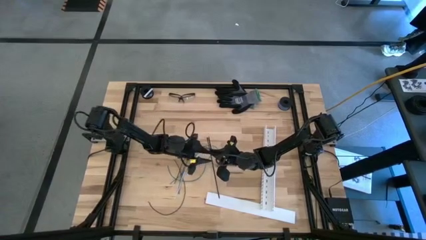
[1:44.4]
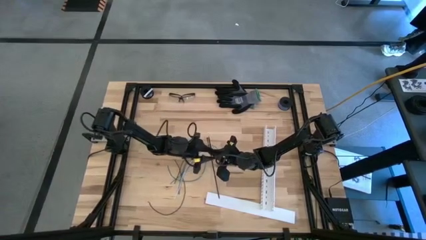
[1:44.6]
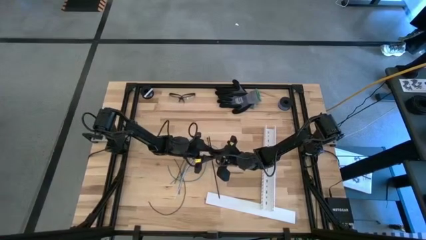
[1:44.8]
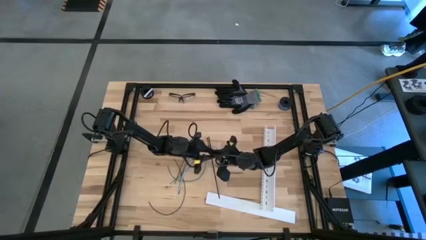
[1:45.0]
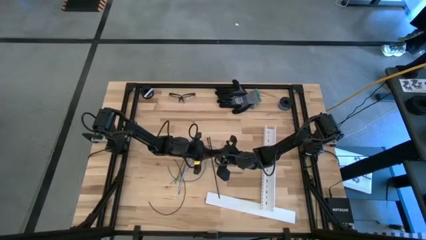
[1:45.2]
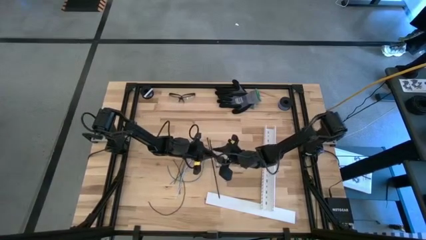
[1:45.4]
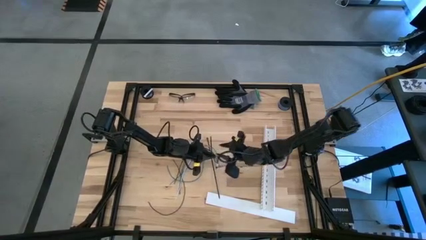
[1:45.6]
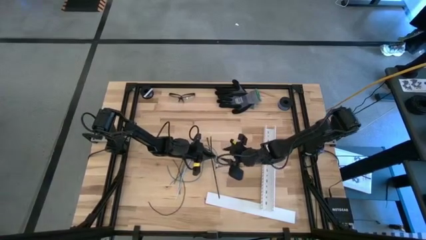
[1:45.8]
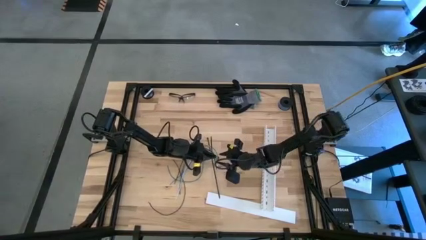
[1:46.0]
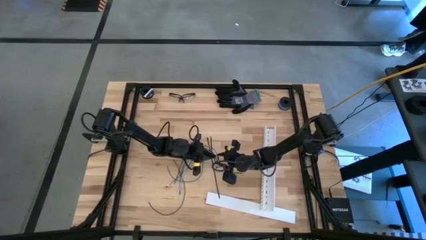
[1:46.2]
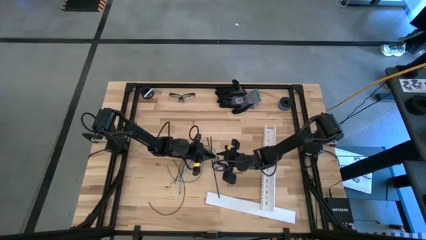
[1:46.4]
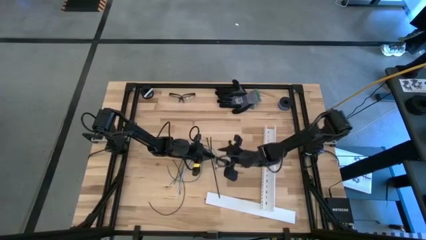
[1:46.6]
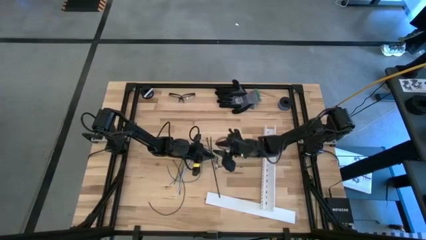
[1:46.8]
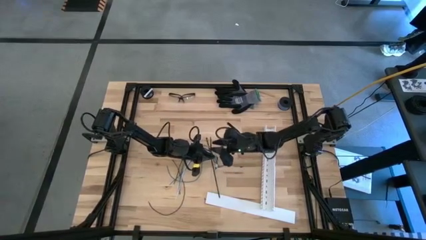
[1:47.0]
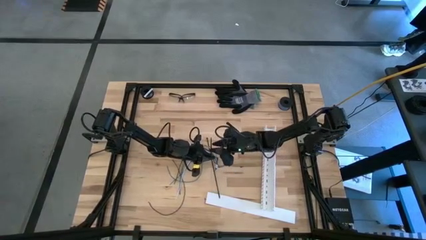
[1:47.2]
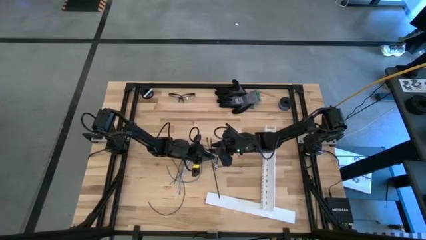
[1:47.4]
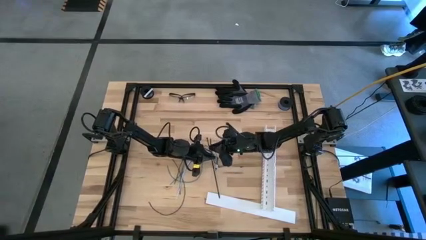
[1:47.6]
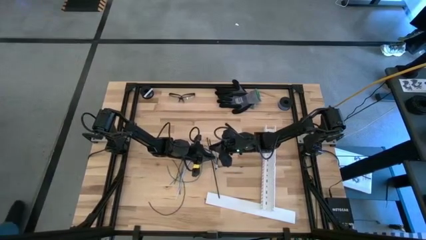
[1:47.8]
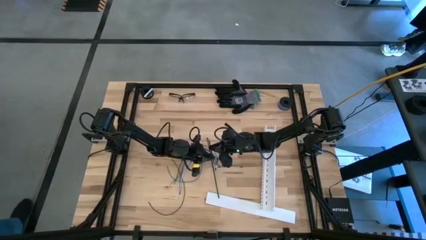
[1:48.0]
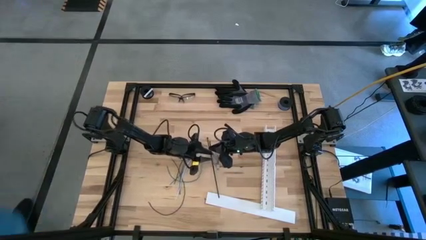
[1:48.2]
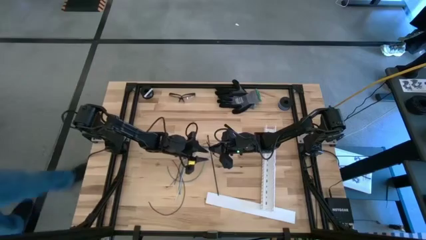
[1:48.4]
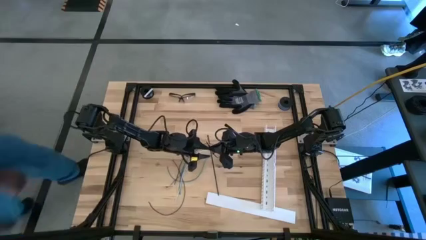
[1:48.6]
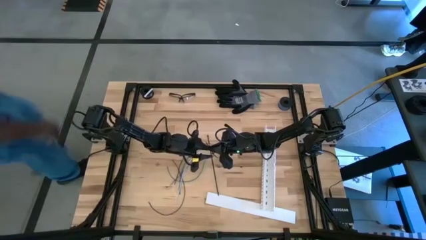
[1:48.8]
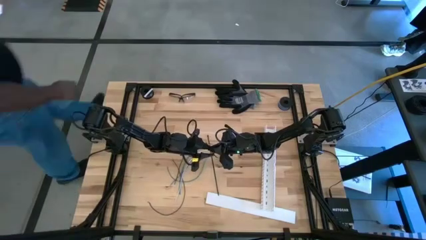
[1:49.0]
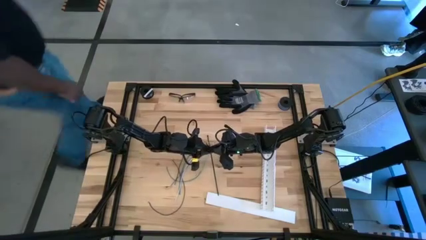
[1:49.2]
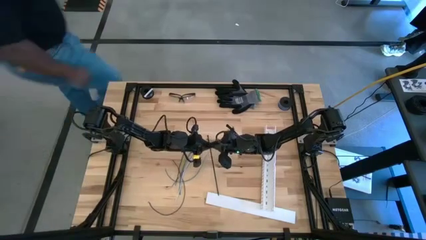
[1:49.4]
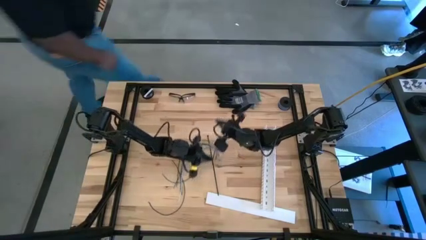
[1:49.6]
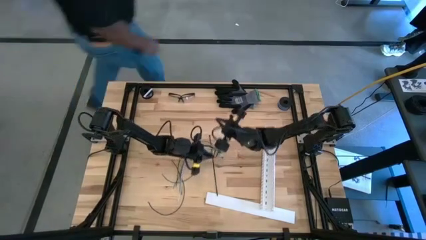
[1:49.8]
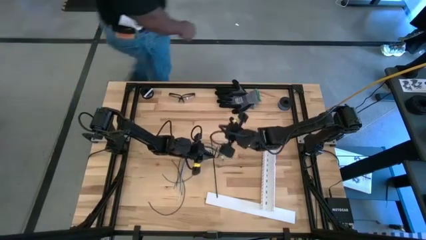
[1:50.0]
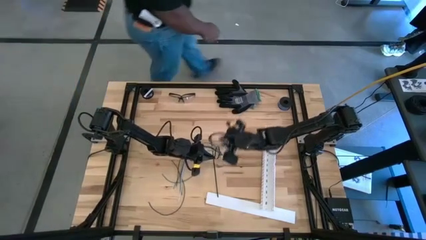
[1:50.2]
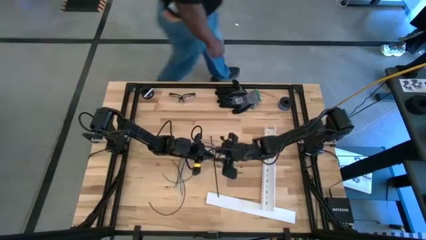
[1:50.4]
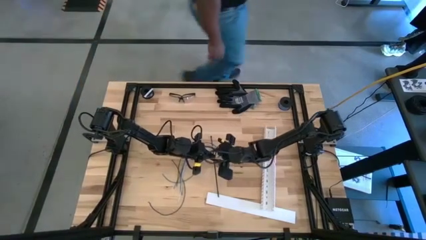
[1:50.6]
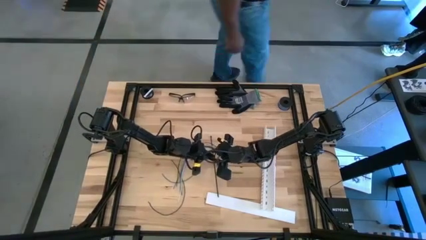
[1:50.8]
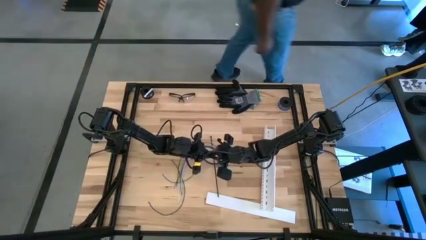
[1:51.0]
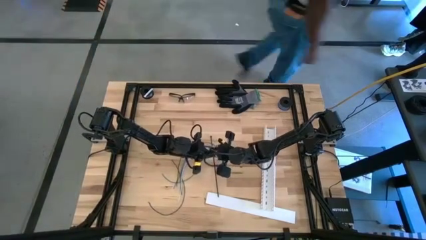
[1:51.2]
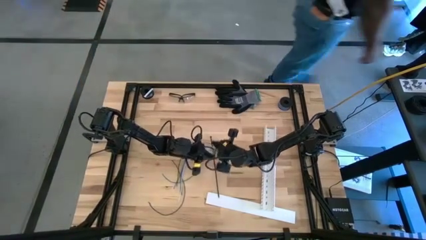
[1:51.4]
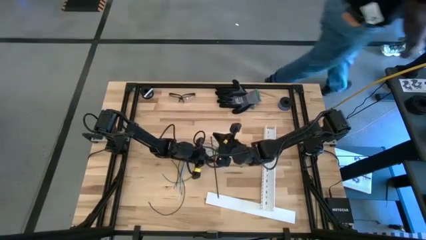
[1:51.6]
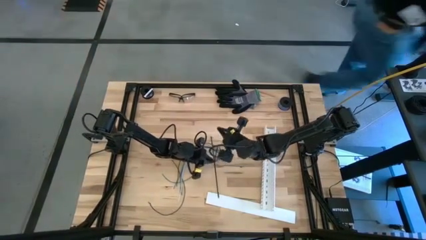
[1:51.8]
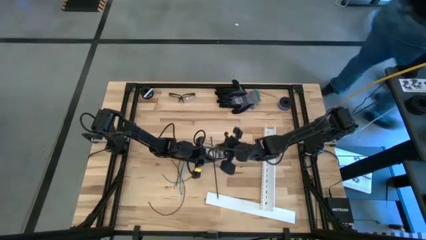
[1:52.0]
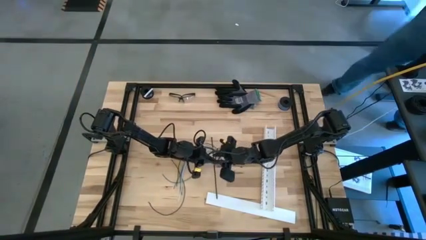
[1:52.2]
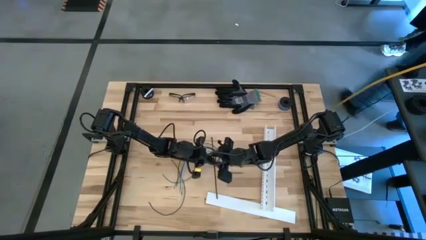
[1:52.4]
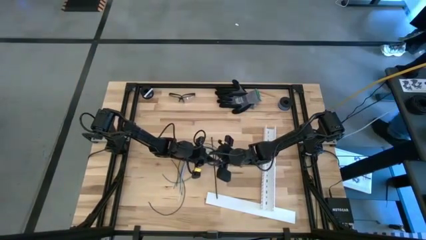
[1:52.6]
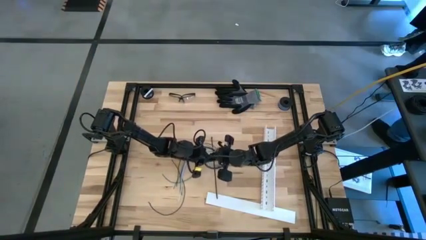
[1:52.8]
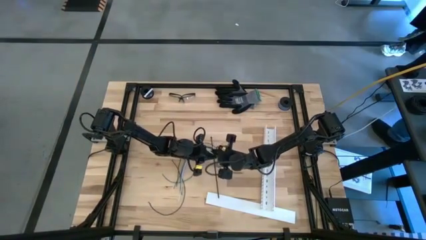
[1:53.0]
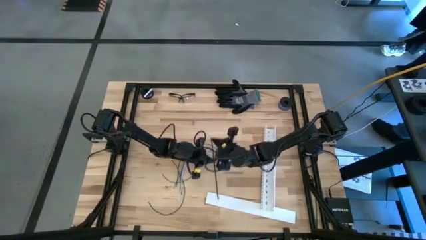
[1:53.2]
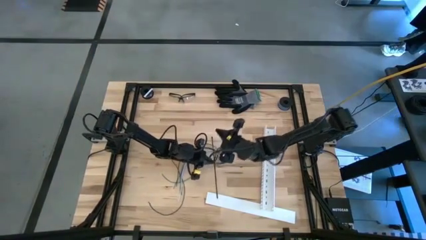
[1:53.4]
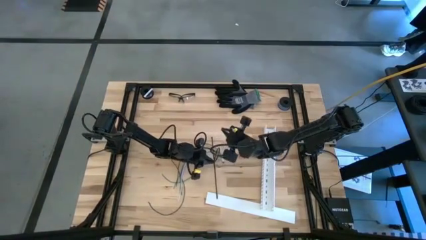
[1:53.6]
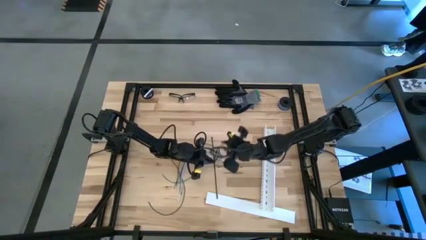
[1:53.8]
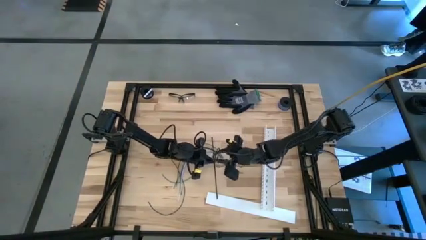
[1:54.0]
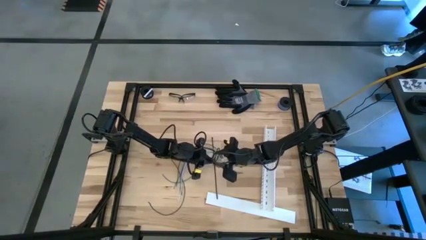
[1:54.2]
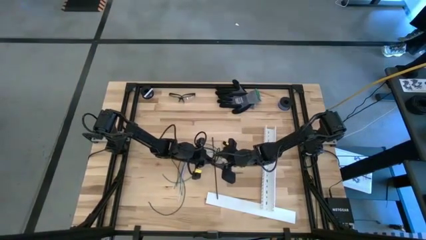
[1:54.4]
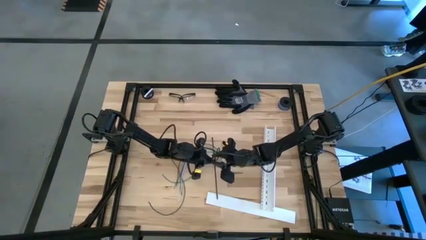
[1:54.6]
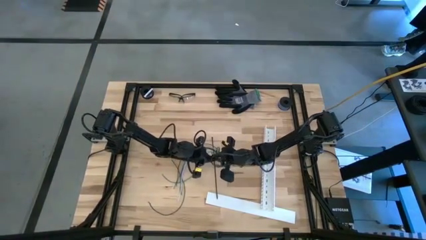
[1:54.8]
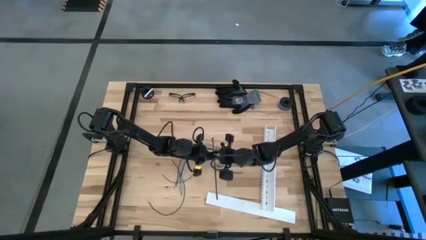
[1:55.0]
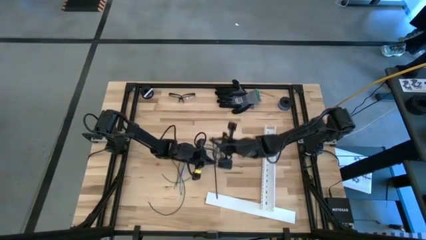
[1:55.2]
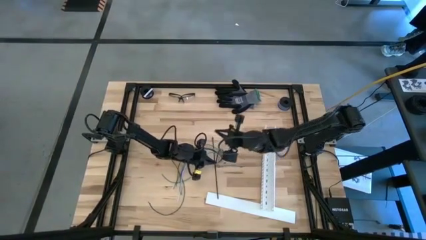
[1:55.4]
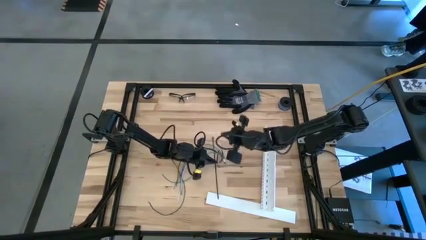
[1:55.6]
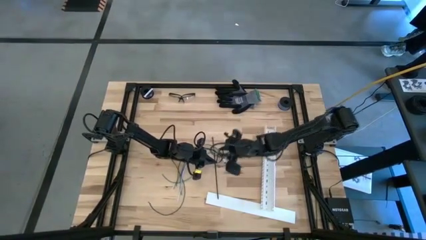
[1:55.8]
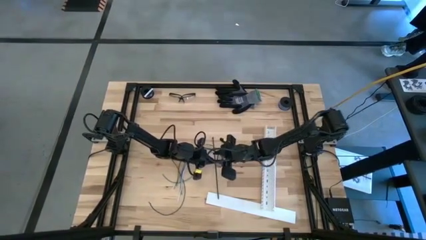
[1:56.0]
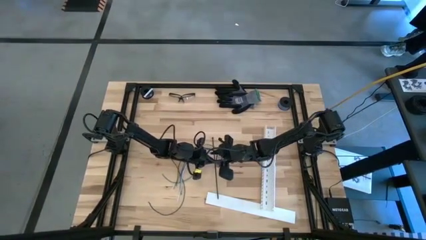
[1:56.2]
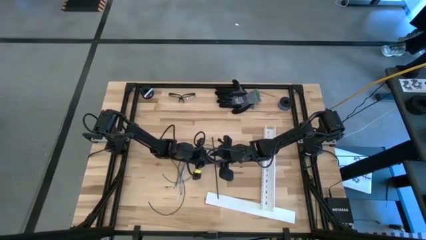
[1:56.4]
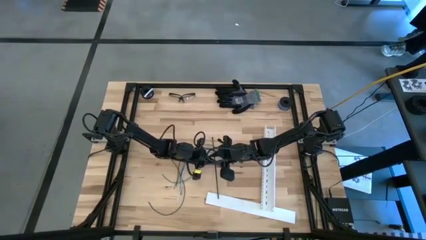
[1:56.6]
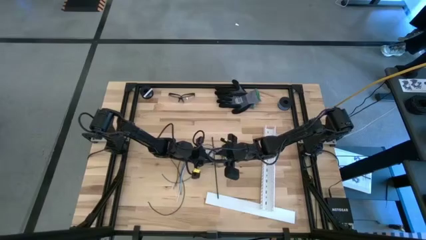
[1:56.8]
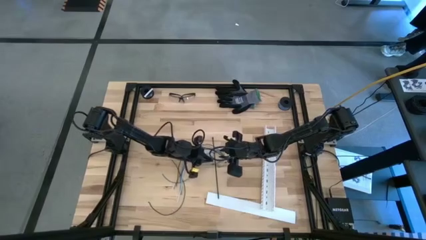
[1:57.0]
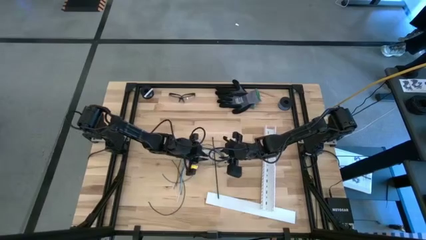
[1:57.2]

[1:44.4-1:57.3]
Task: Ziptie cables
Wrap the cable wires with the black zip tie

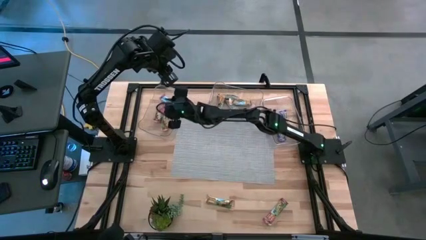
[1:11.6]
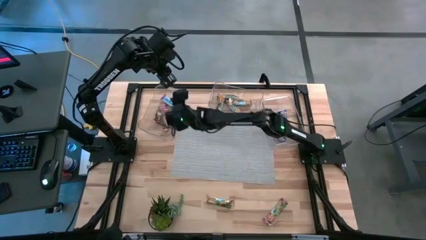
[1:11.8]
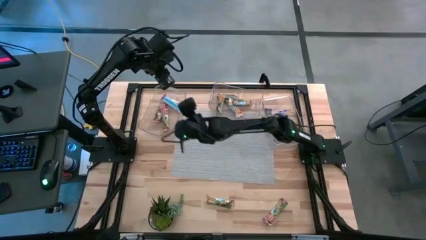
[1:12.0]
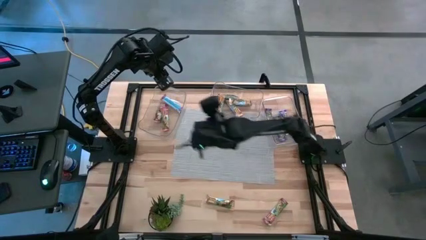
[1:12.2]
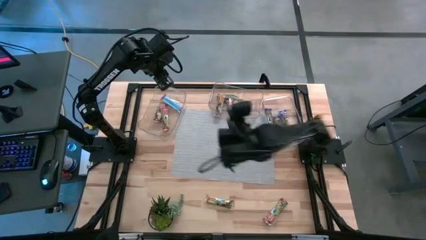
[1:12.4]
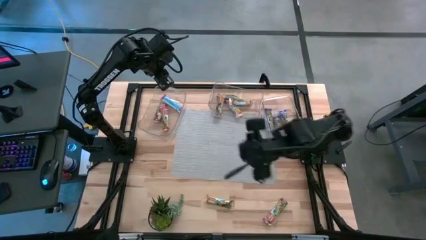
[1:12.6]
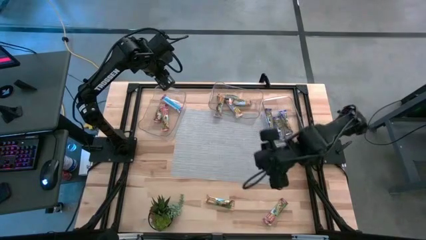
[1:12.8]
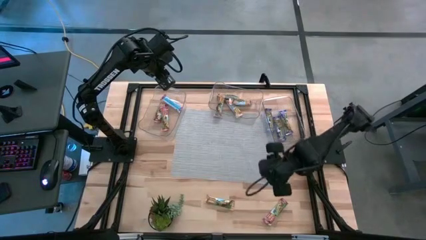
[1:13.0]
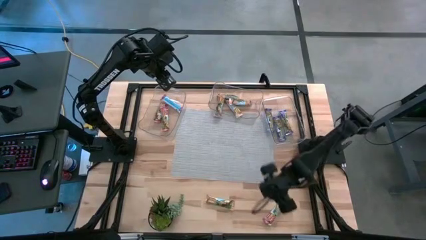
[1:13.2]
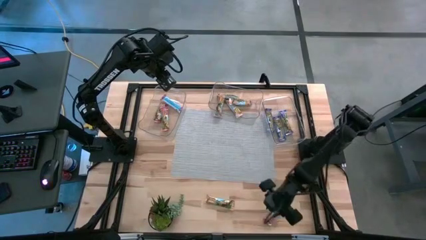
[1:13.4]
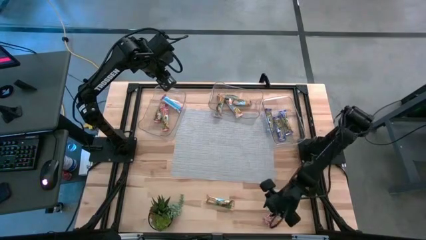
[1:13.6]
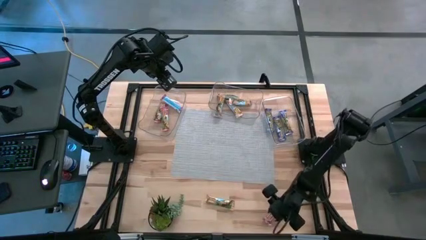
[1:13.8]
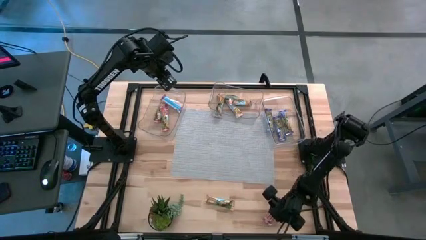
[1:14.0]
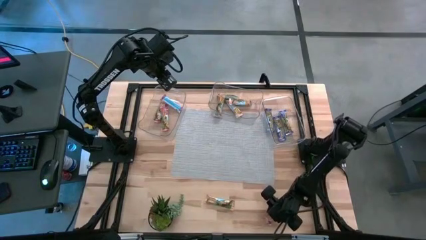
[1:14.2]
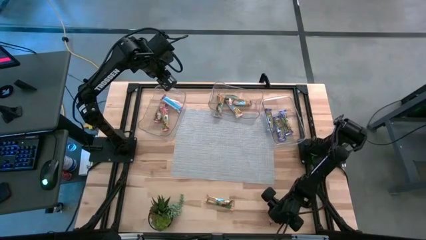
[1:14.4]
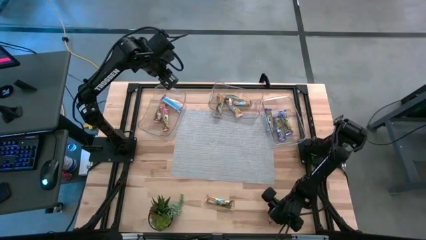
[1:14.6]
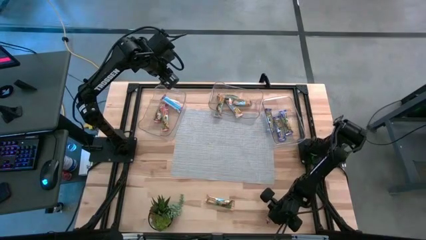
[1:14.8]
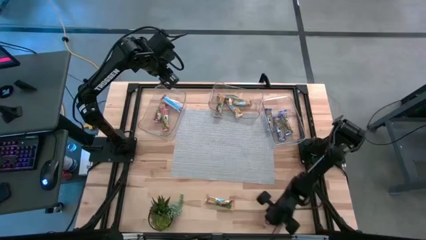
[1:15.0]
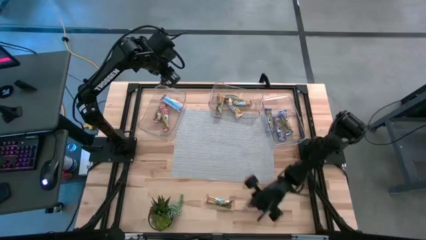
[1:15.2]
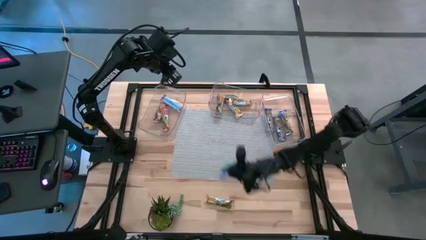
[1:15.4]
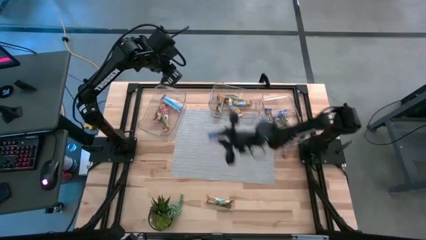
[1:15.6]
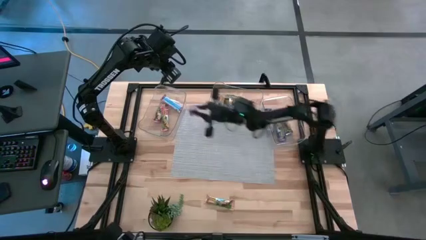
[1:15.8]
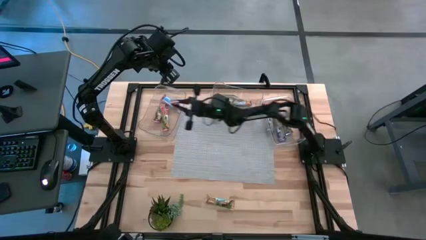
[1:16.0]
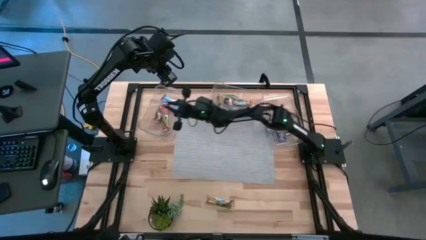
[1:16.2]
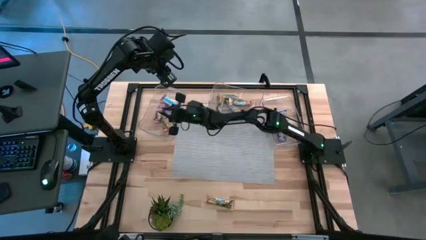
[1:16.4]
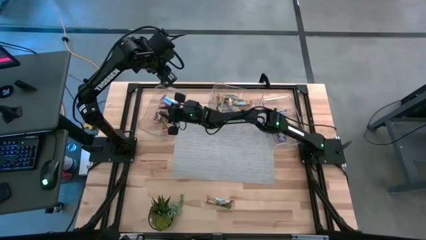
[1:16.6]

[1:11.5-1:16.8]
Task: Pick and place Granola Bars by type
Put the red granola bar into the left transparent bin
